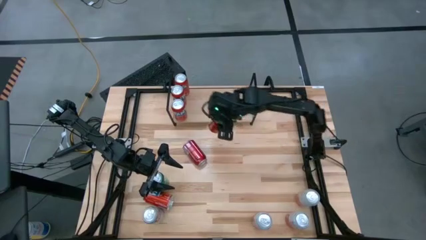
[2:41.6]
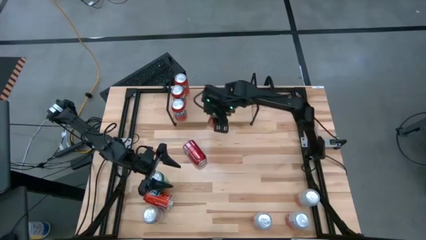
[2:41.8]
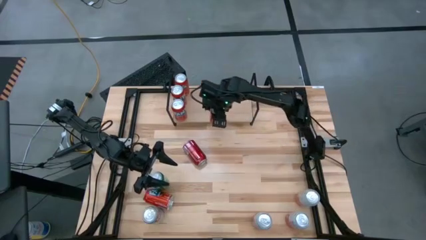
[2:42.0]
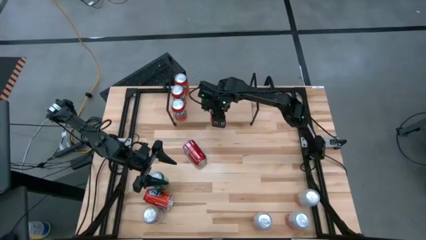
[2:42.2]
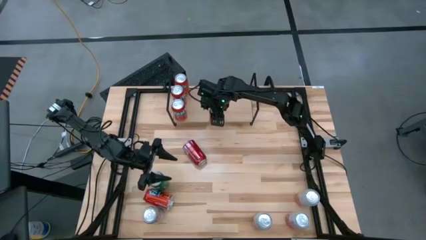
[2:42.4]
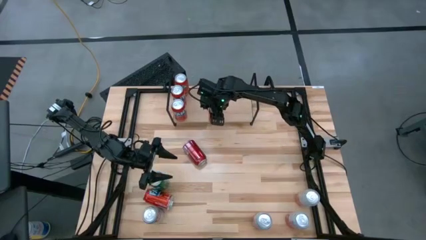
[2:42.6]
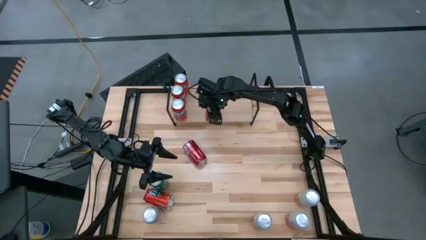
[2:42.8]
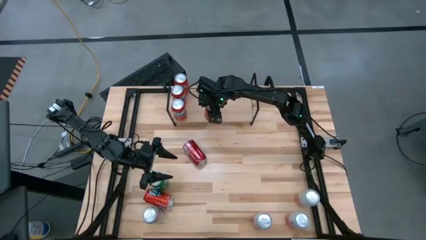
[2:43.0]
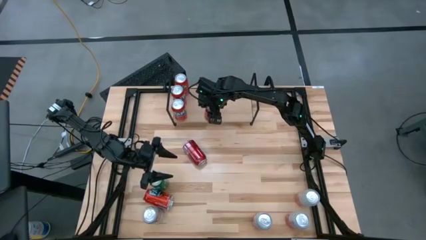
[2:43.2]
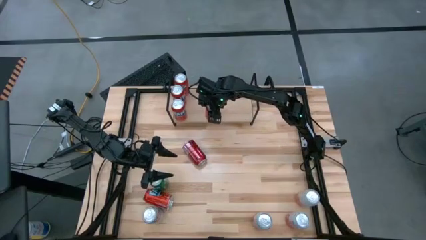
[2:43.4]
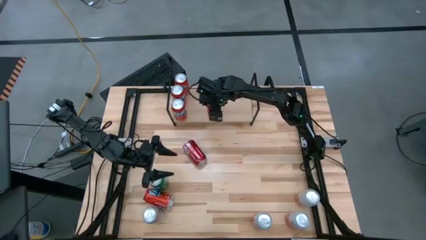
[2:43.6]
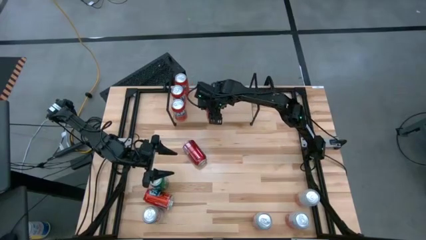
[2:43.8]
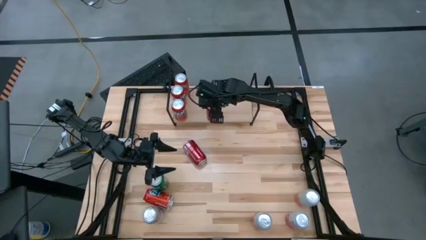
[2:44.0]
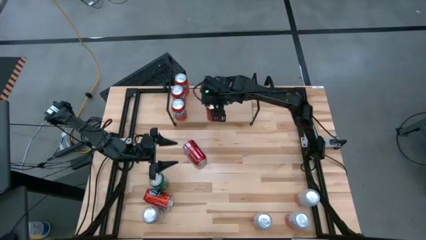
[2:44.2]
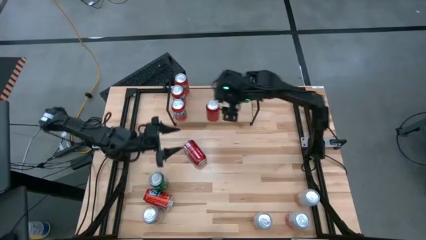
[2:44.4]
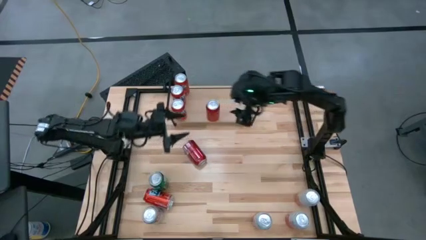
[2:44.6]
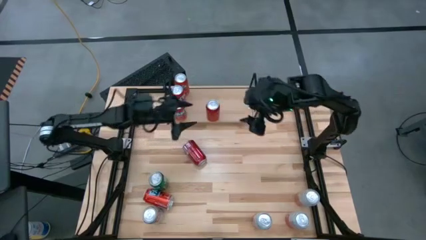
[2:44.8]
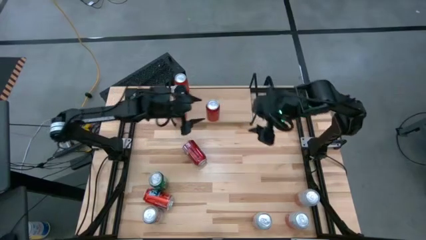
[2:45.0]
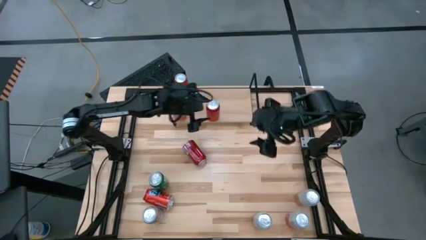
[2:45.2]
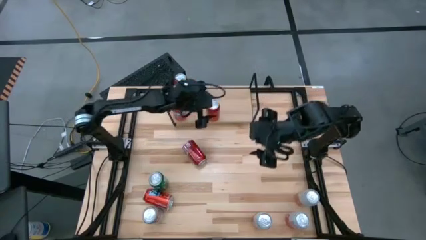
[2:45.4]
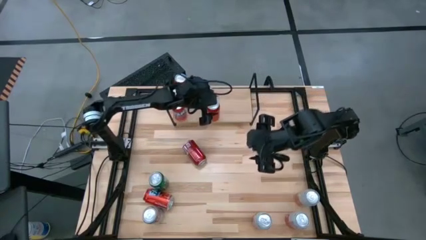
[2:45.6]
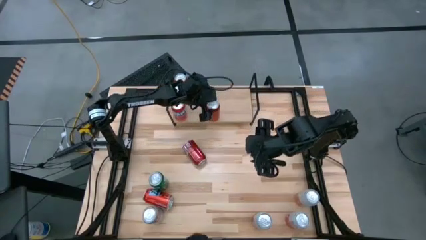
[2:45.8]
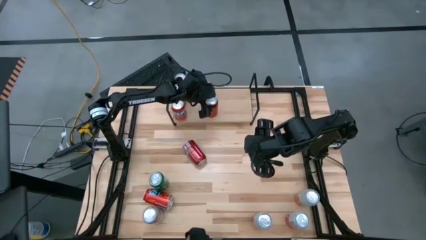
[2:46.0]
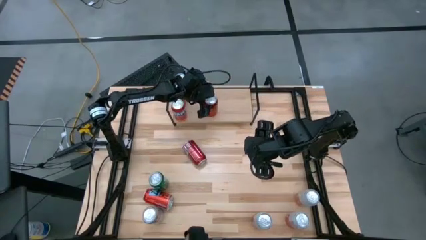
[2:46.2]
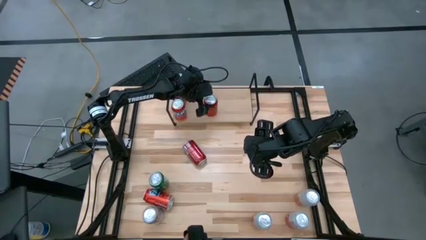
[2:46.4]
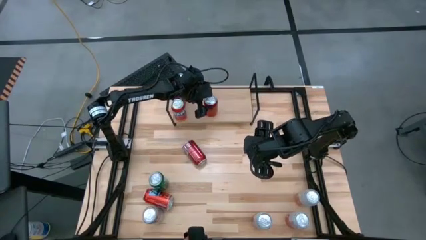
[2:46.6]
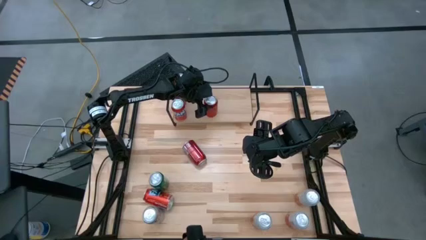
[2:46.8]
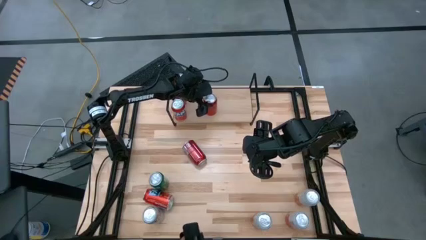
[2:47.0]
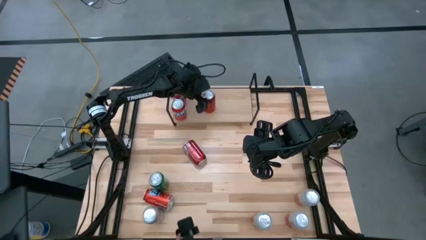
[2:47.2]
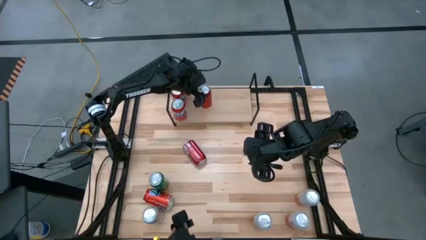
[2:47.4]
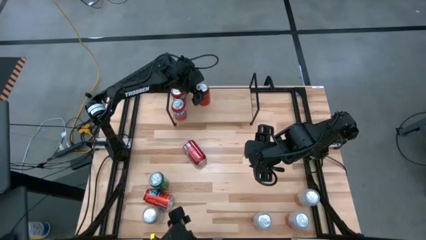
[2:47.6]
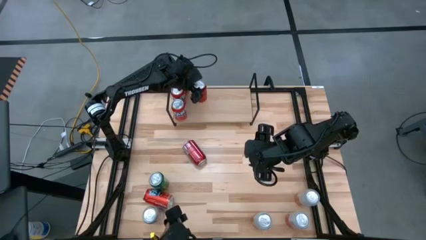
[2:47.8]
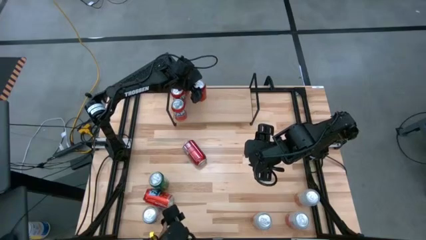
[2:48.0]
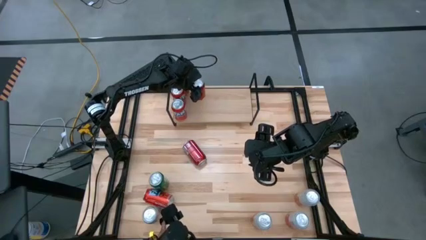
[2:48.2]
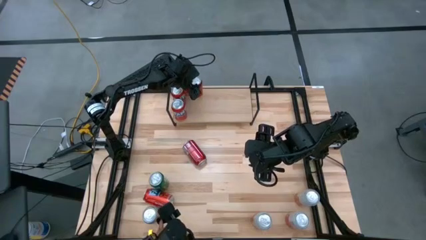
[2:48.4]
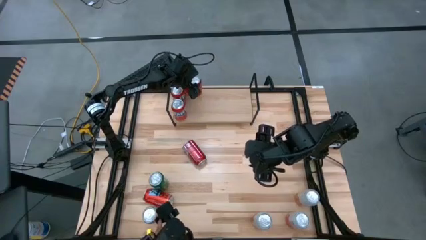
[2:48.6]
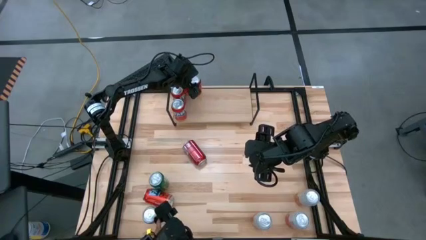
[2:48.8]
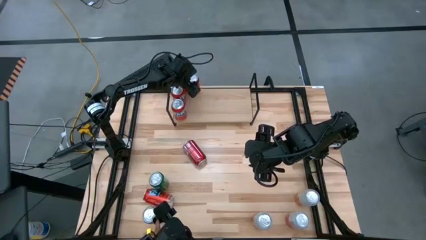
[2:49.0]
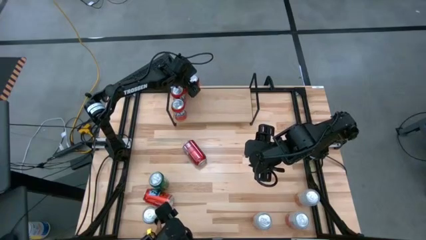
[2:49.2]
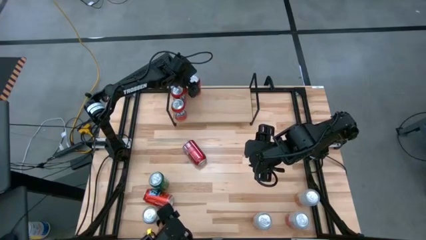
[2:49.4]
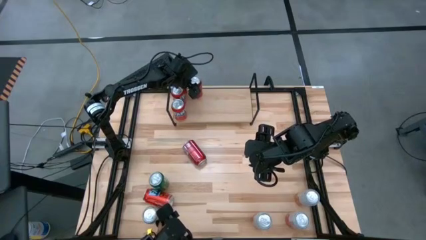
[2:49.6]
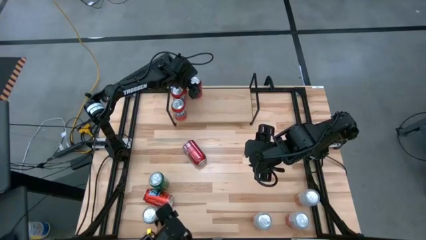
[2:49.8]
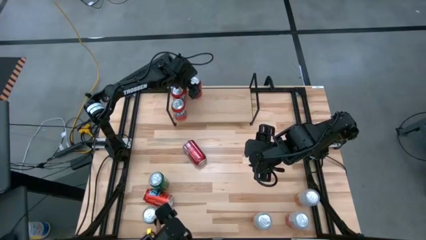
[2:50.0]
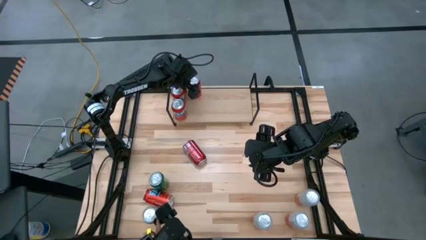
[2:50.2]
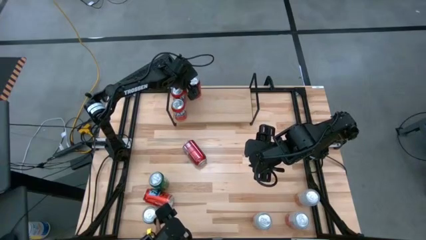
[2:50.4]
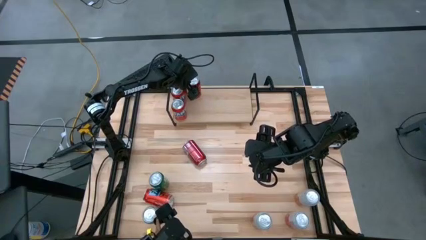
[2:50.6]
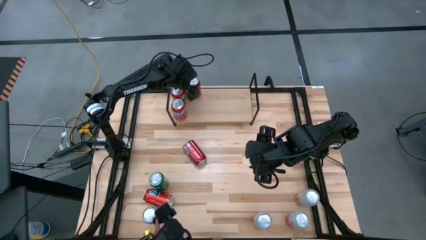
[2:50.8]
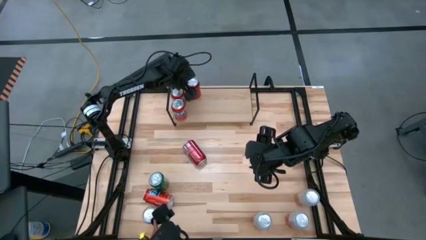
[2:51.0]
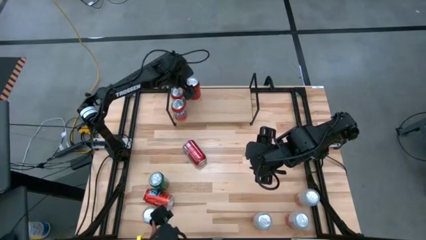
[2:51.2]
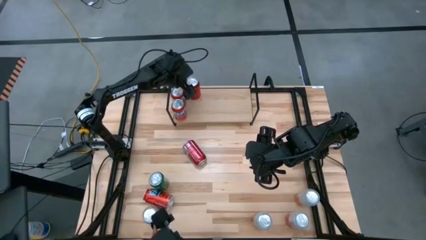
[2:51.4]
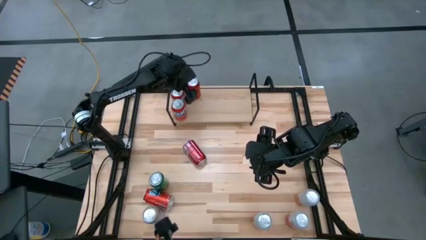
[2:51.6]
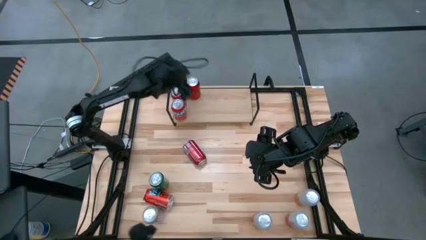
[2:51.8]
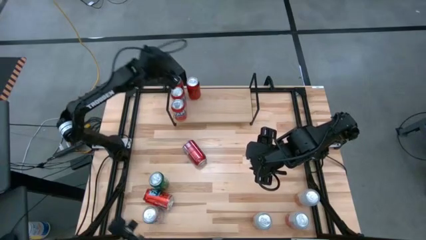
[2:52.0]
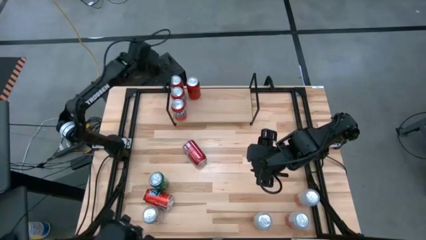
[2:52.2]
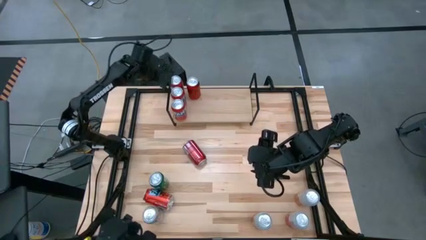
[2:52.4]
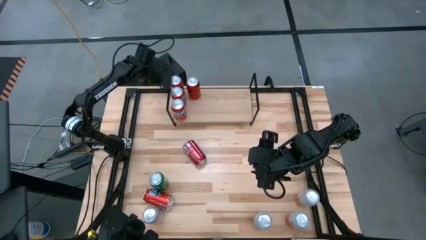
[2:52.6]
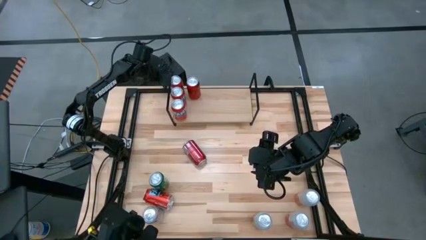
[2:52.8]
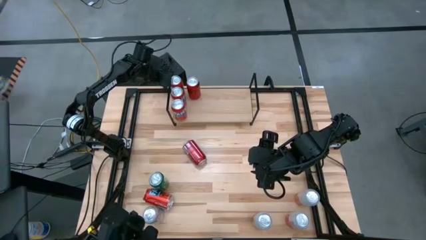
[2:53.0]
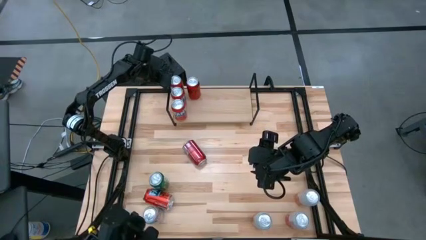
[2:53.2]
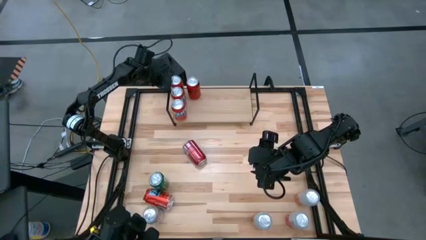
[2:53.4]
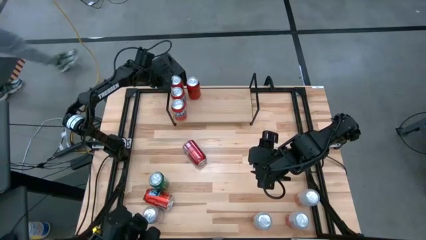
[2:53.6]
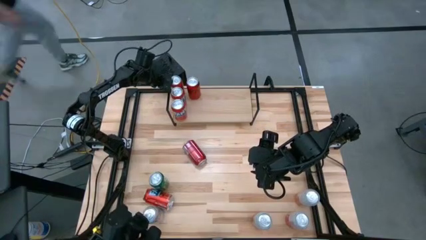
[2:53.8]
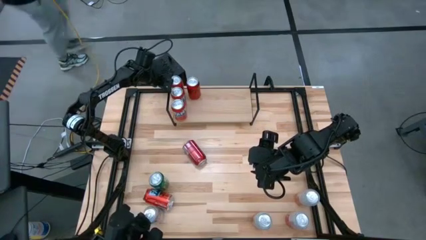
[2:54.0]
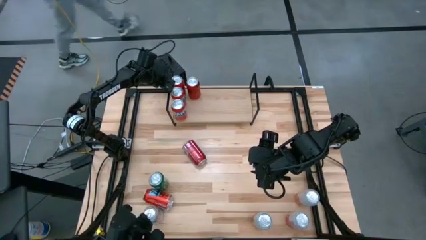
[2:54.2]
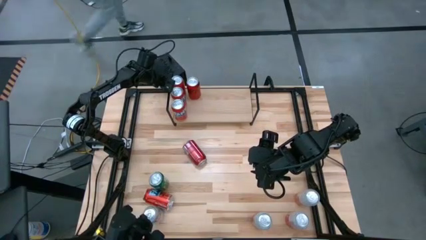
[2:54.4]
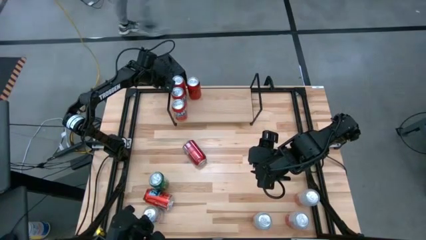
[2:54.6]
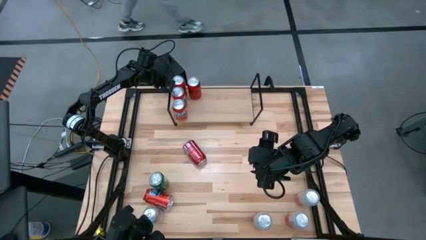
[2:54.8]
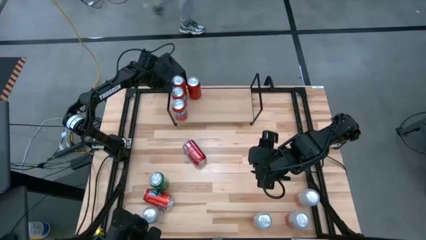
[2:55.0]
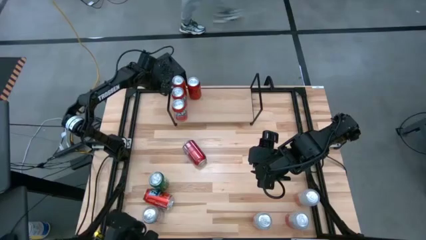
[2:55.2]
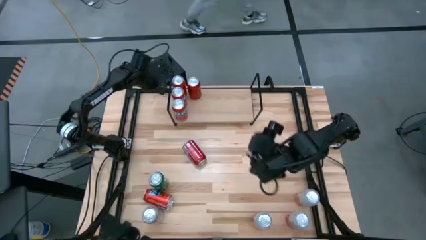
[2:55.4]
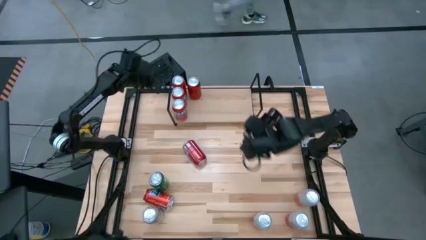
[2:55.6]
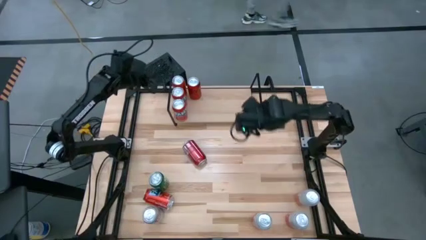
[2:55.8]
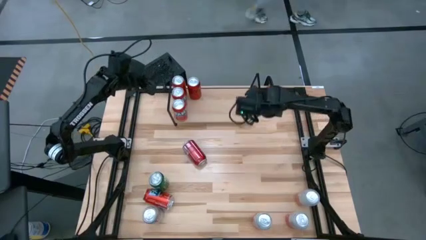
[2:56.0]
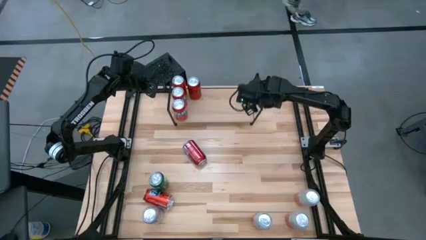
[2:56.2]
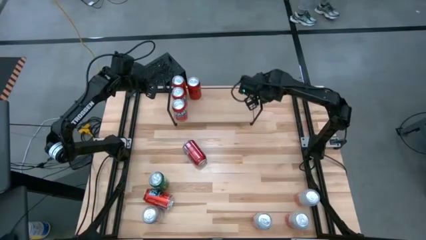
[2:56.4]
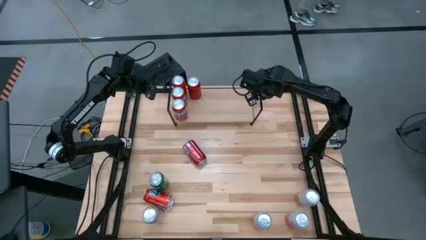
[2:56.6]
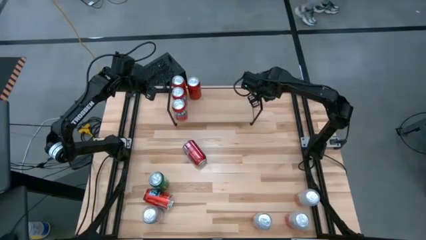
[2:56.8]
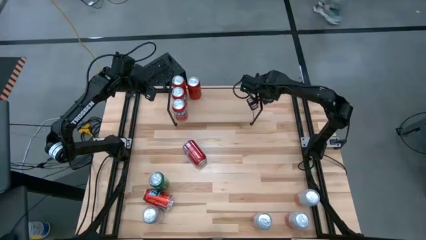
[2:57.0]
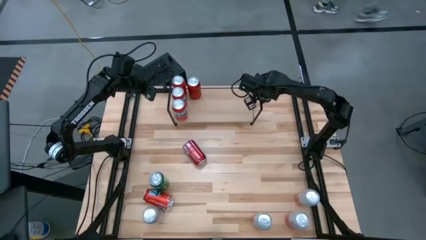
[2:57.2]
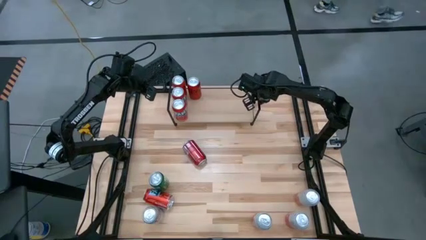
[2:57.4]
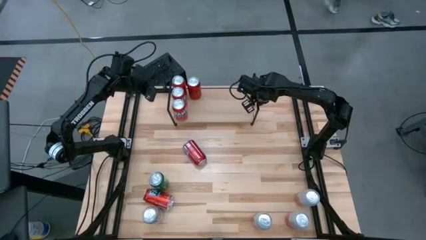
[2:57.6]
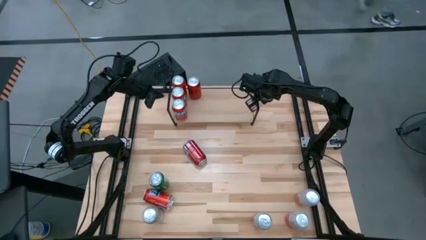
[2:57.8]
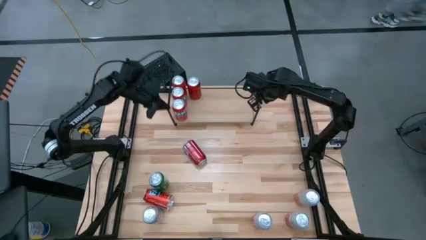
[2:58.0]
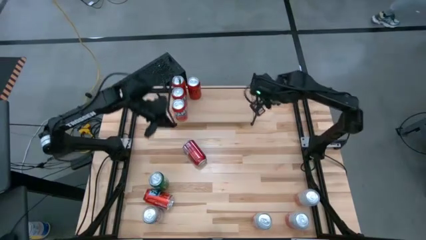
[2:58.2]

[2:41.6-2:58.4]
Task: Place canned beverage on shelf
Put the red black soda can on the shelf
